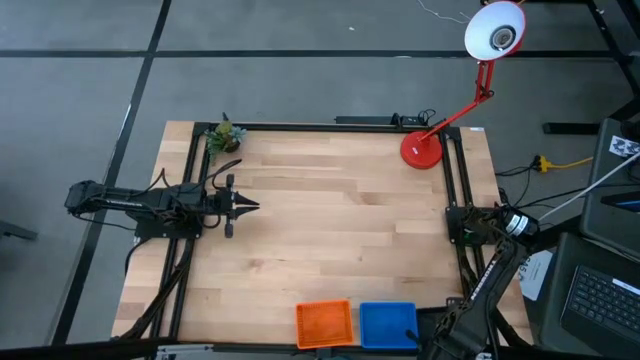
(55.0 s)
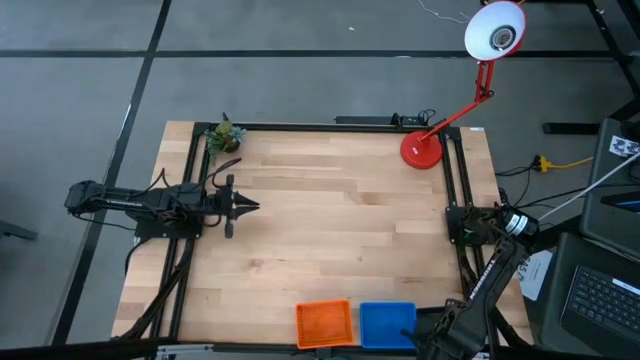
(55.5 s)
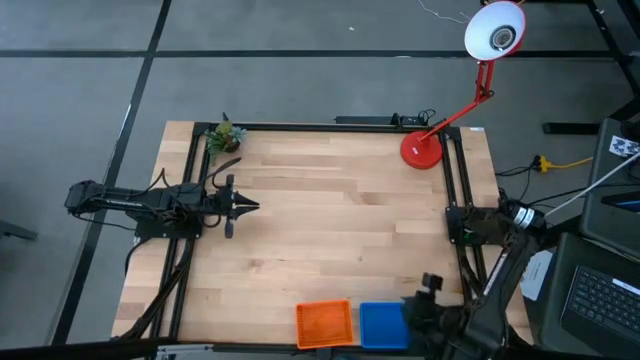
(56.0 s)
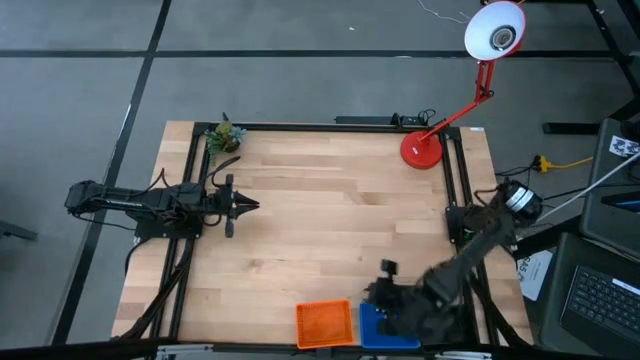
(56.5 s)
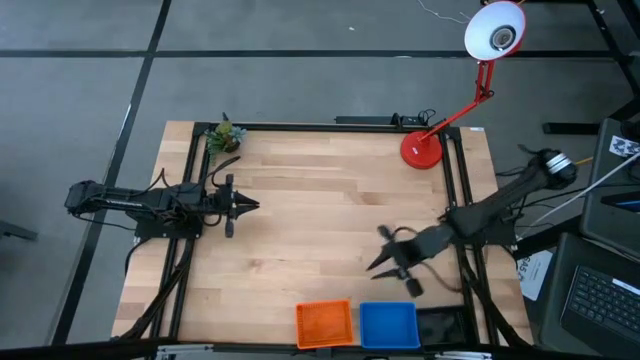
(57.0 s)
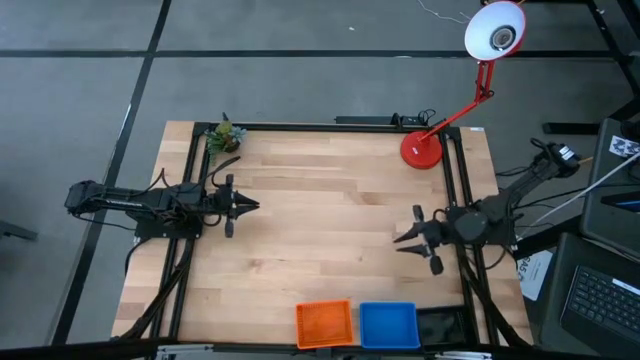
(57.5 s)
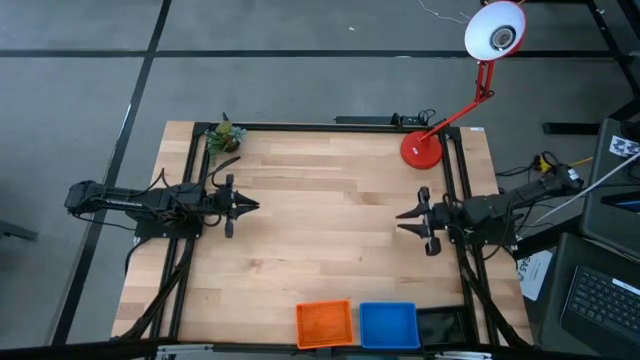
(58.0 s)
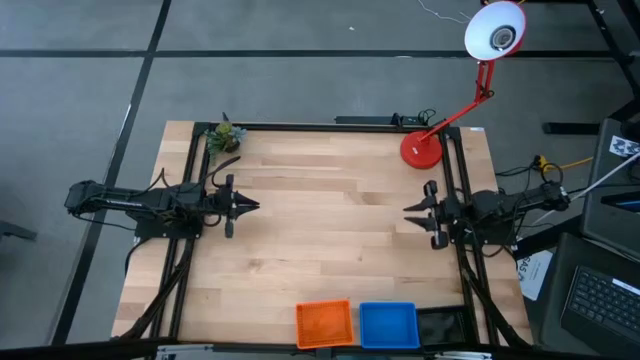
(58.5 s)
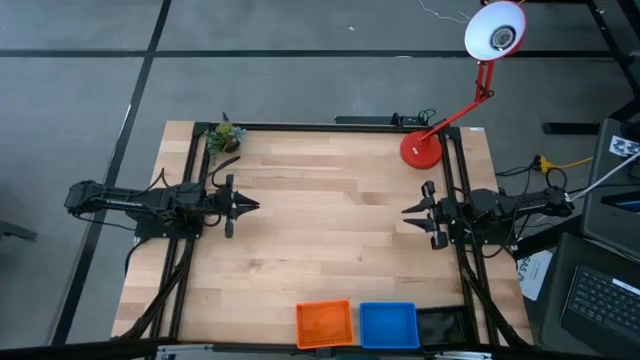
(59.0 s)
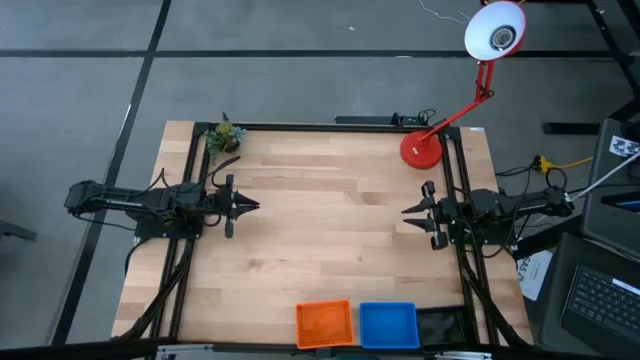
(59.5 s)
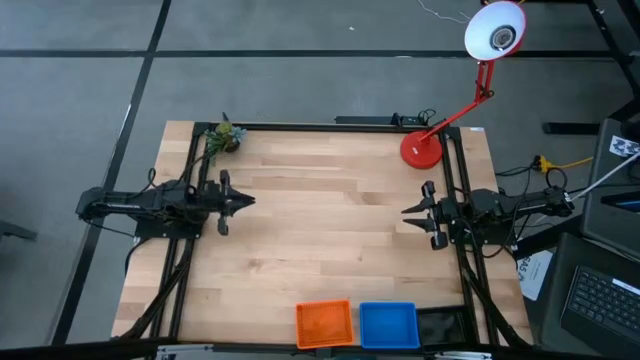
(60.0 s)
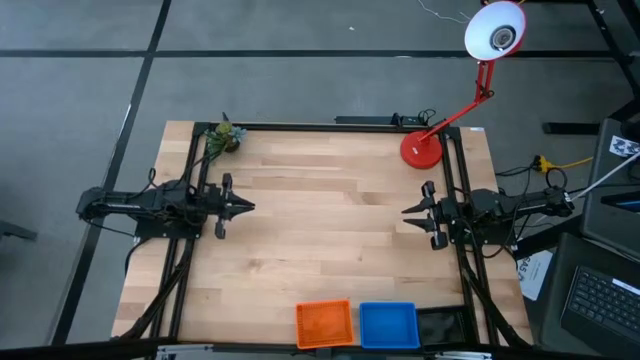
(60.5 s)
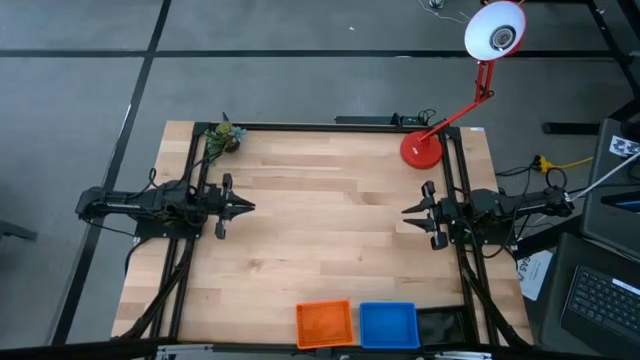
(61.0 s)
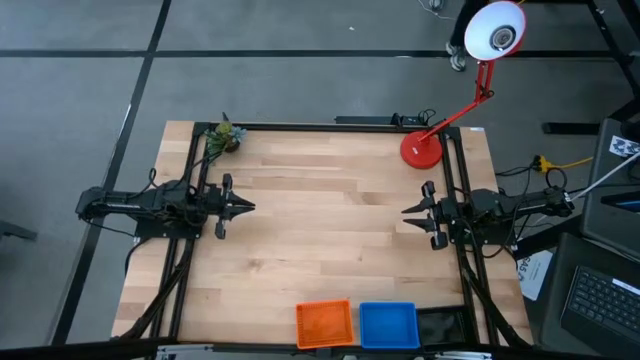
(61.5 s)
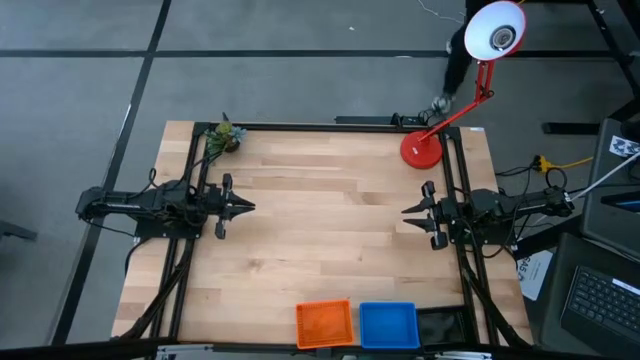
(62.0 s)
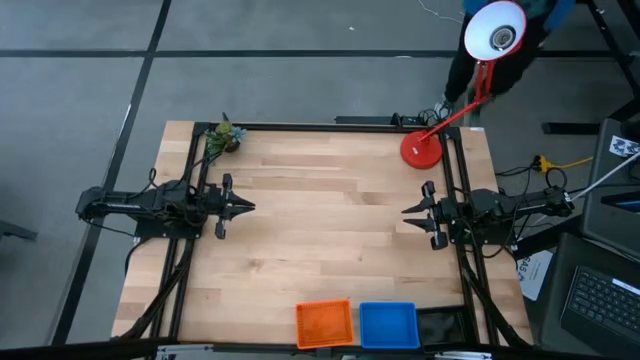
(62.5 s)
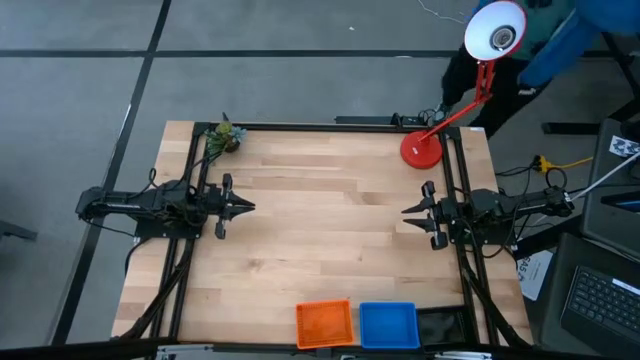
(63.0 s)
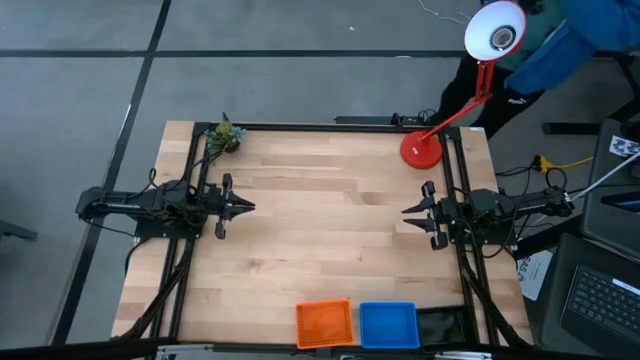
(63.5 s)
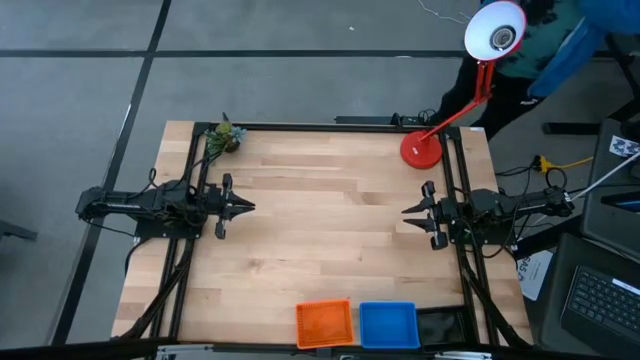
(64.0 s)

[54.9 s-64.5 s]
Return to Home Position
